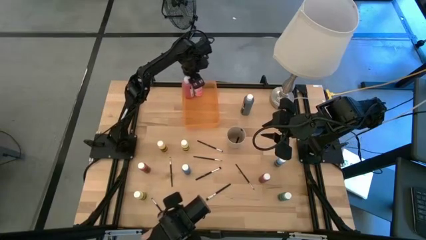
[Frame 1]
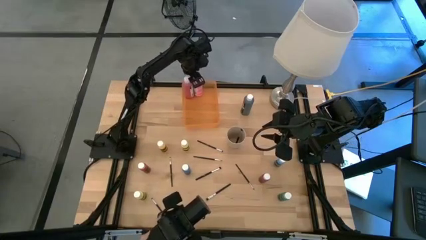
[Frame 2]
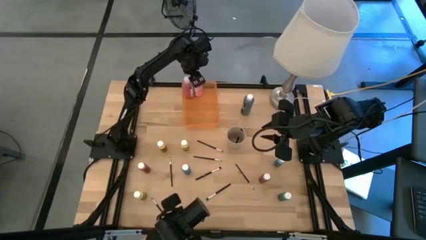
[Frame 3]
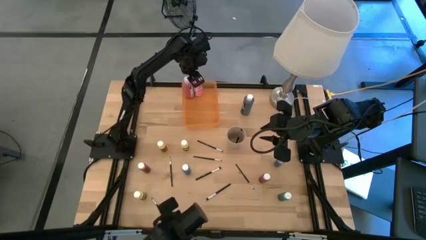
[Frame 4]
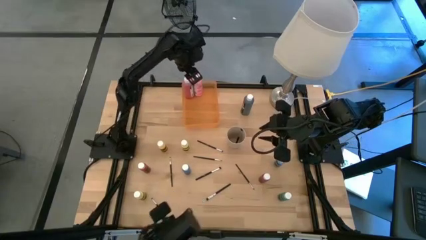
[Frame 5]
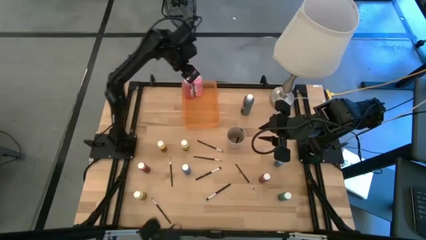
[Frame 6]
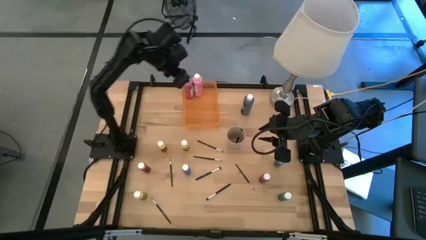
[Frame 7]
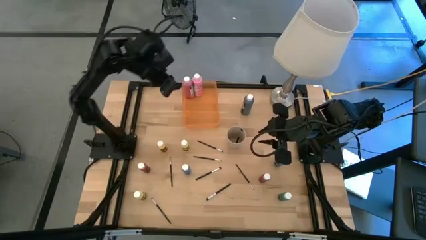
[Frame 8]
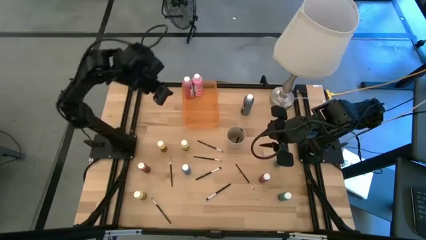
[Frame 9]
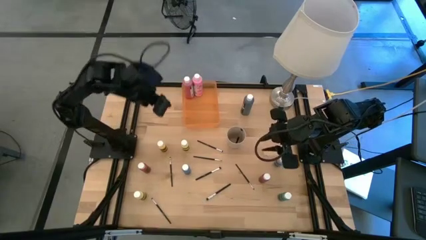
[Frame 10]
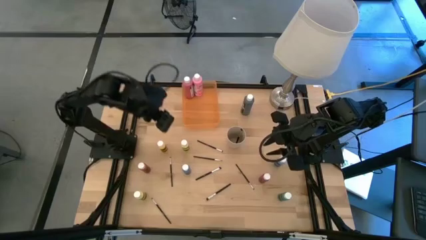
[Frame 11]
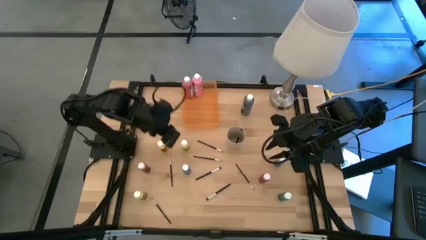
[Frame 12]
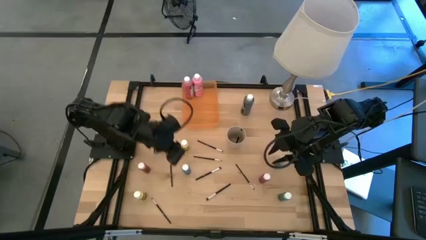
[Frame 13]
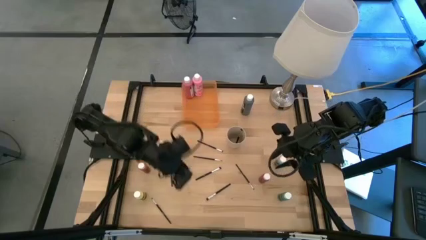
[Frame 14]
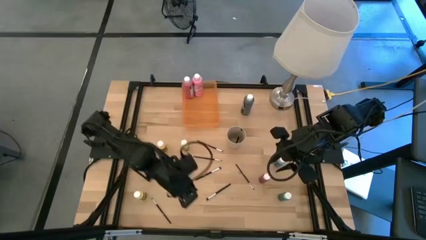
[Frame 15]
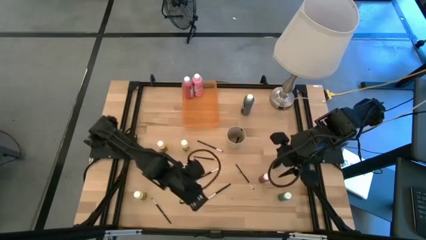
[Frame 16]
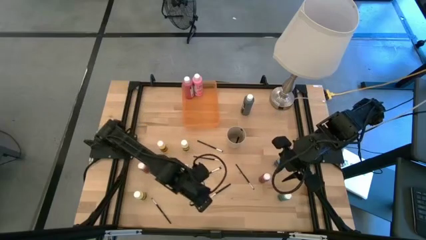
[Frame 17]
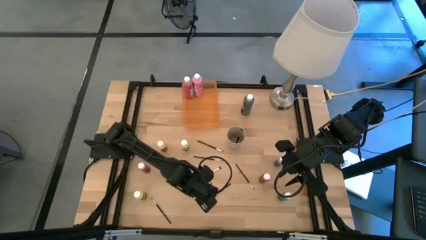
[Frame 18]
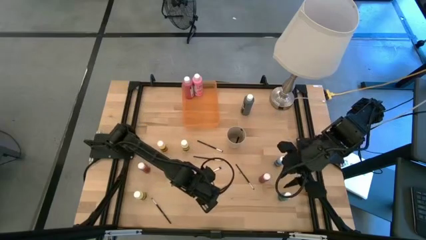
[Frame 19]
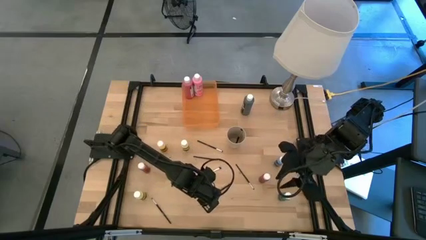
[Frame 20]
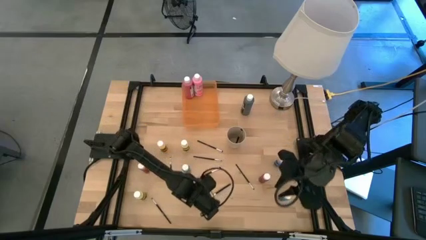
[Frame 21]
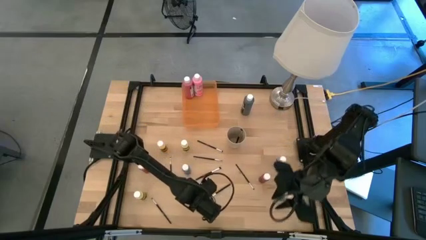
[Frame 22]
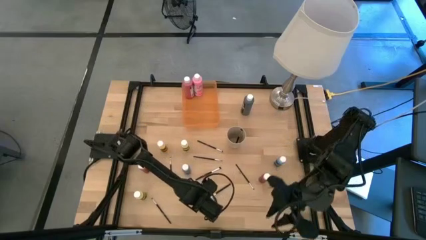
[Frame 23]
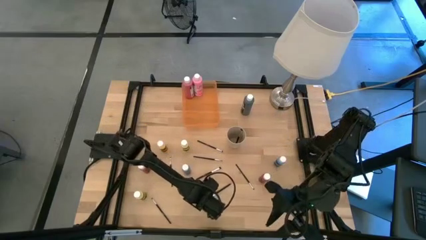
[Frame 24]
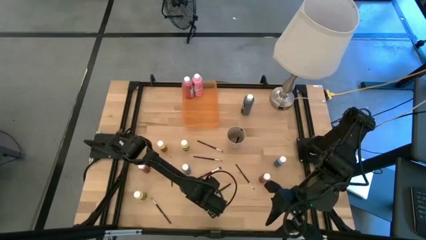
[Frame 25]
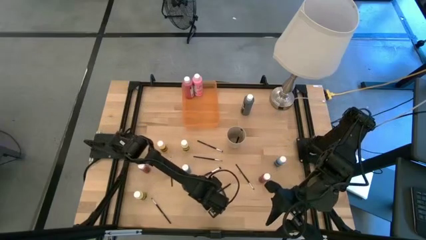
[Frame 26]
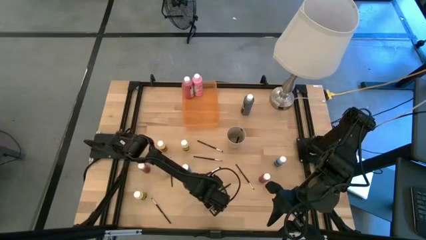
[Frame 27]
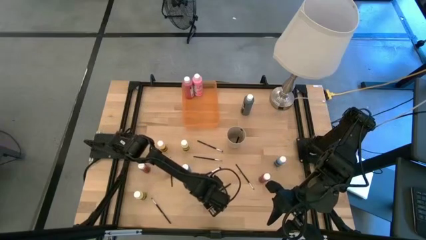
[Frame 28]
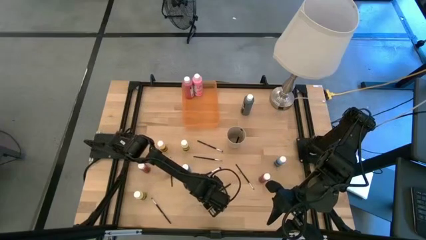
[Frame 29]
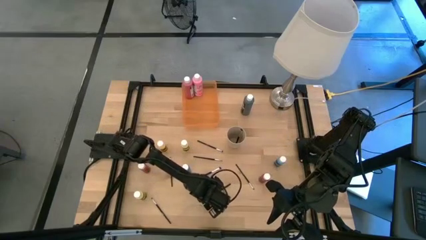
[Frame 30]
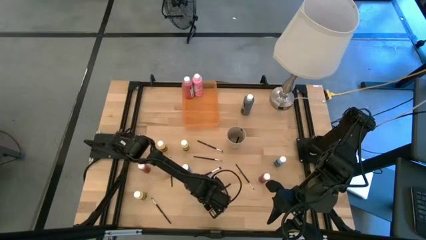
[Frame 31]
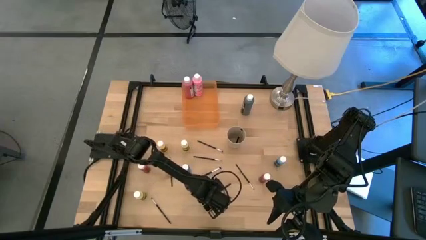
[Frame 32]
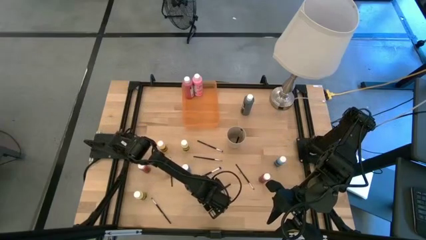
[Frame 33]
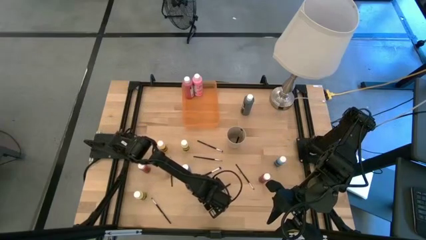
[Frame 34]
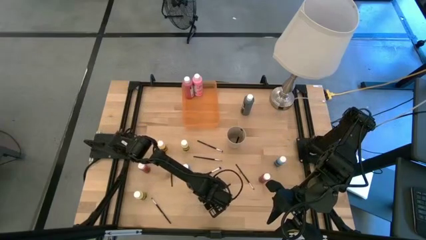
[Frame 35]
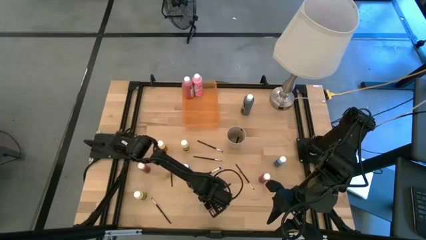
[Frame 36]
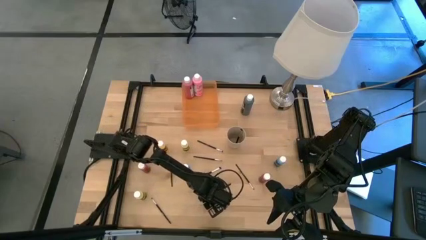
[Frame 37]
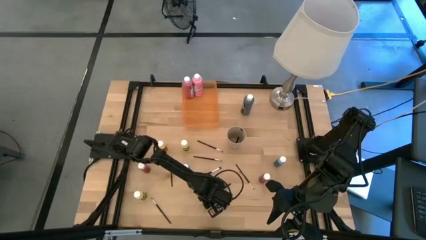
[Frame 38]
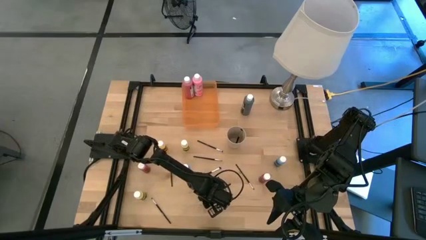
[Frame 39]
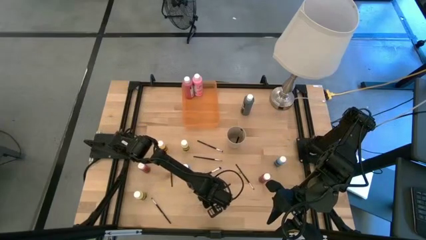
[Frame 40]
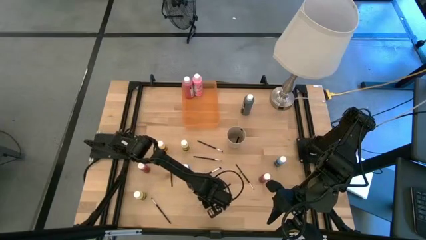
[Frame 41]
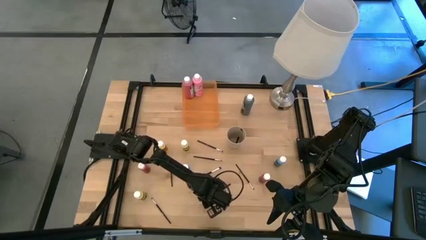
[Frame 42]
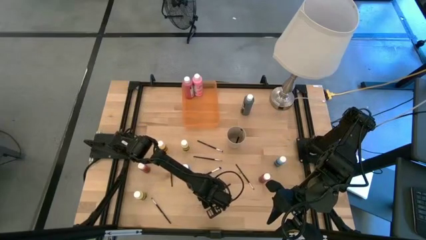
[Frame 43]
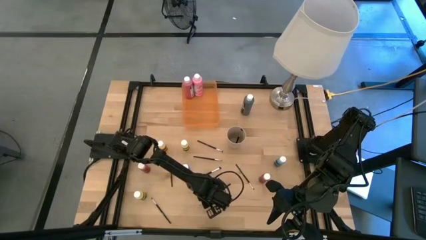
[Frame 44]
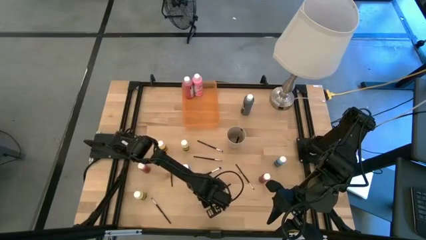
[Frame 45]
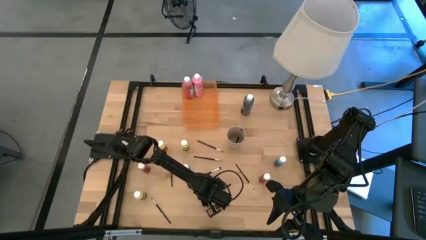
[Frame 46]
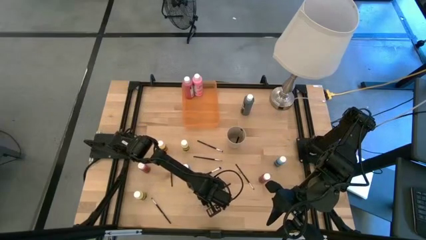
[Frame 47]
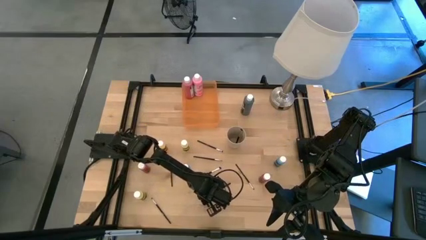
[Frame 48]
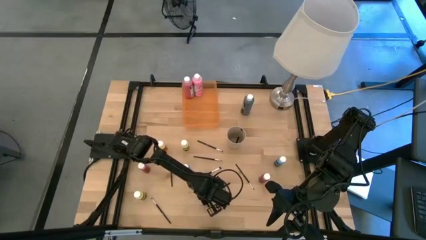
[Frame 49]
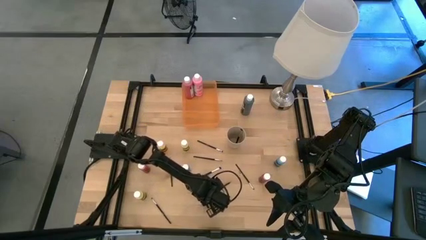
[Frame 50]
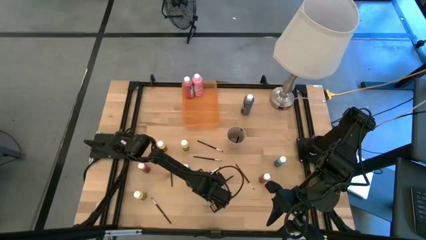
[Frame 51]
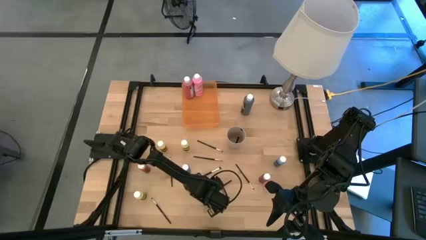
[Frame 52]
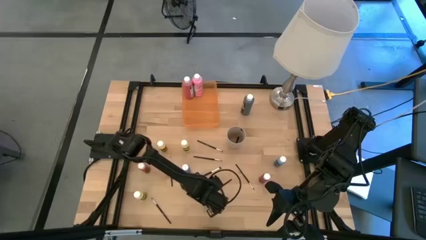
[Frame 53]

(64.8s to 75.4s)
Task: Pick & Place Paint Supplies
Put the black paint brush into the light brown cup

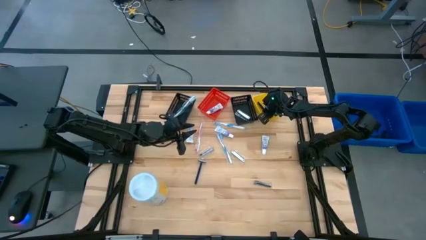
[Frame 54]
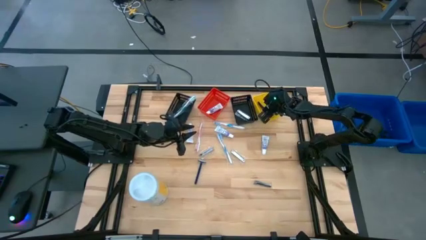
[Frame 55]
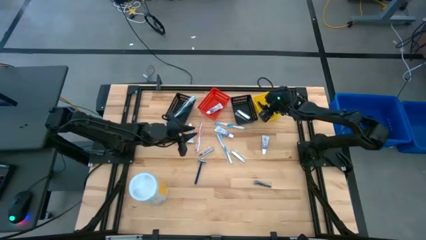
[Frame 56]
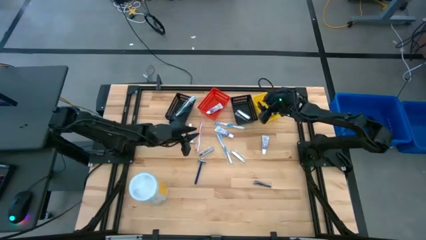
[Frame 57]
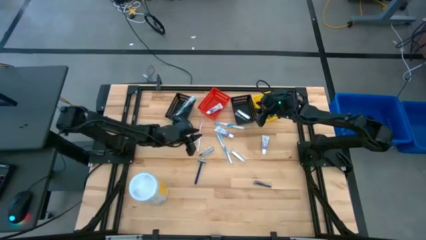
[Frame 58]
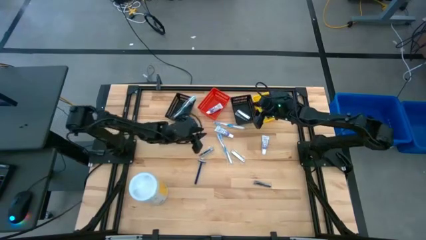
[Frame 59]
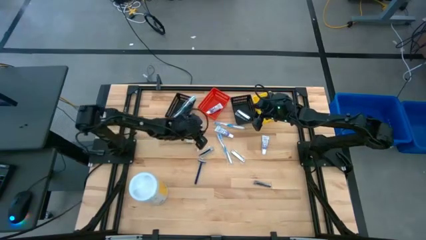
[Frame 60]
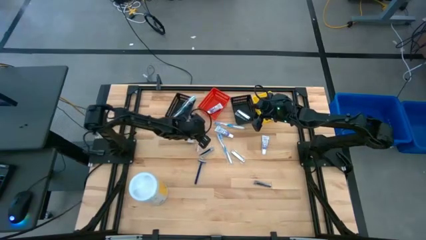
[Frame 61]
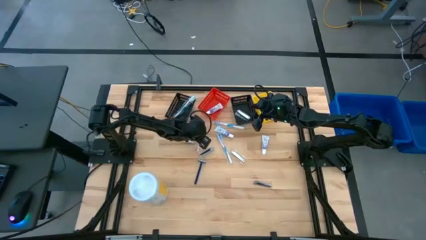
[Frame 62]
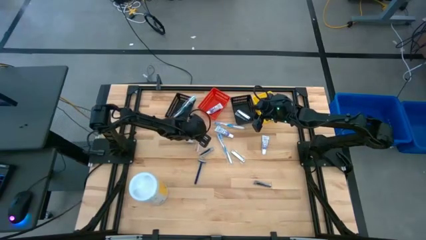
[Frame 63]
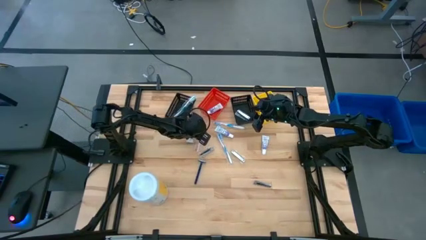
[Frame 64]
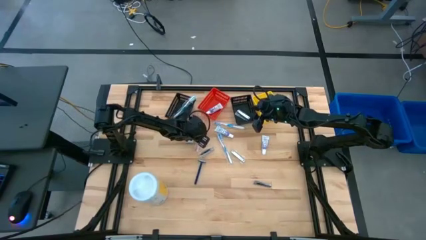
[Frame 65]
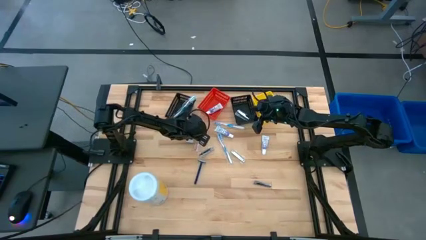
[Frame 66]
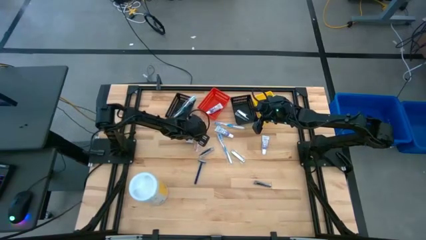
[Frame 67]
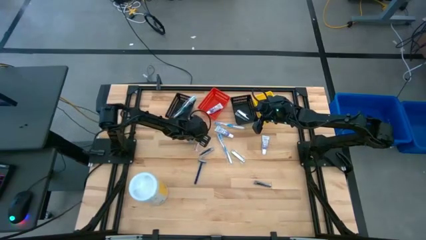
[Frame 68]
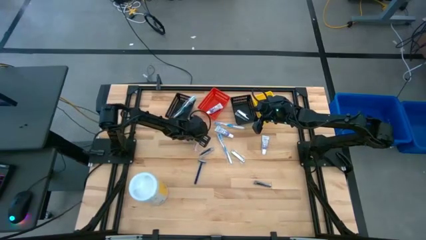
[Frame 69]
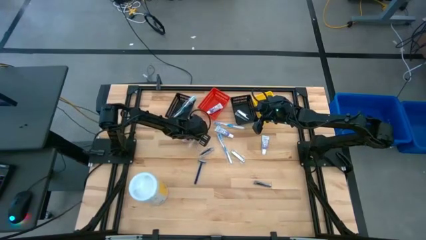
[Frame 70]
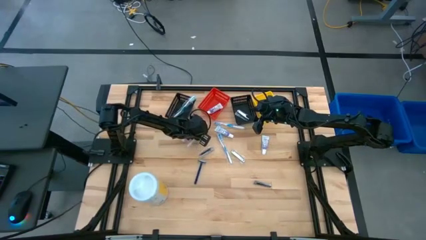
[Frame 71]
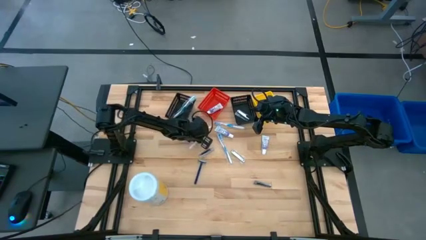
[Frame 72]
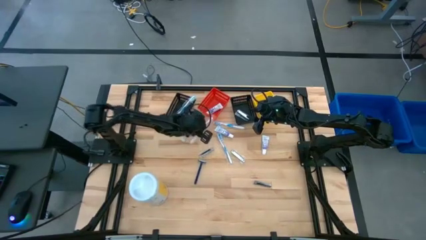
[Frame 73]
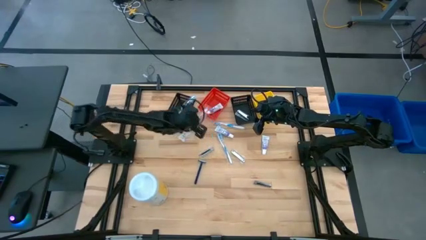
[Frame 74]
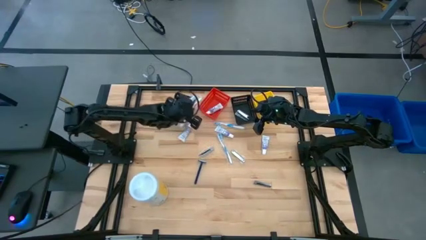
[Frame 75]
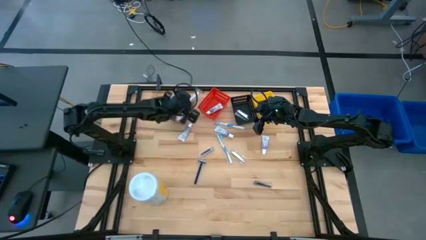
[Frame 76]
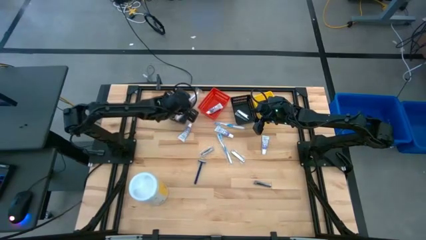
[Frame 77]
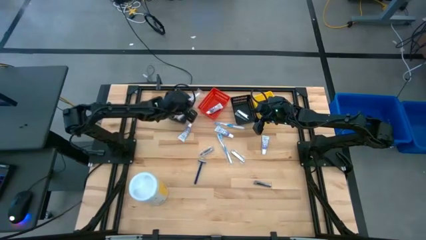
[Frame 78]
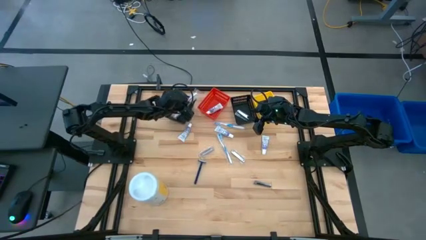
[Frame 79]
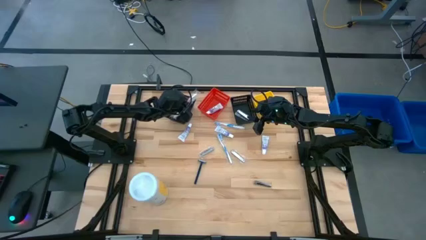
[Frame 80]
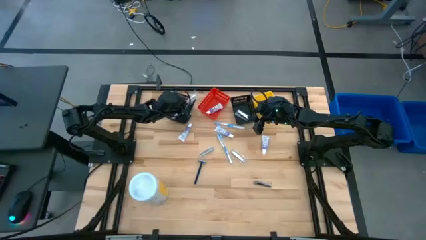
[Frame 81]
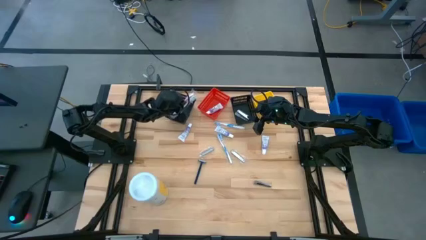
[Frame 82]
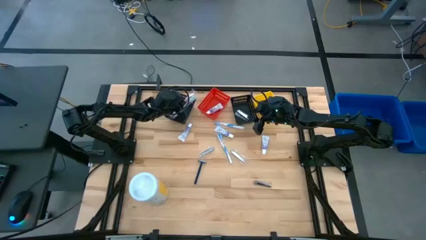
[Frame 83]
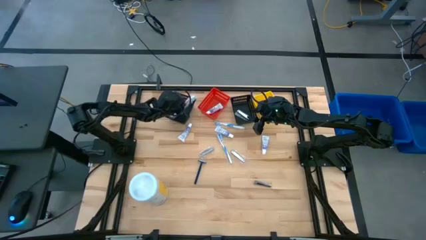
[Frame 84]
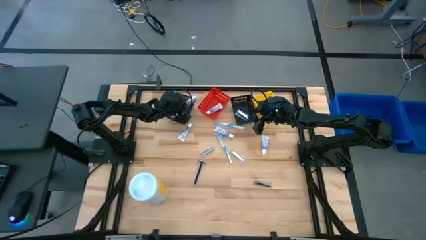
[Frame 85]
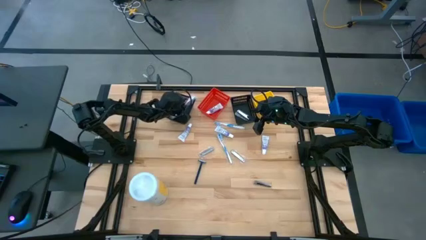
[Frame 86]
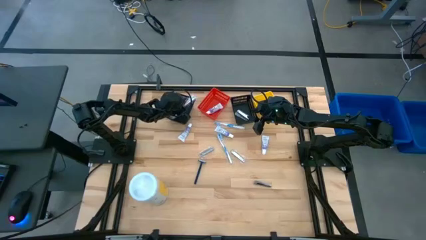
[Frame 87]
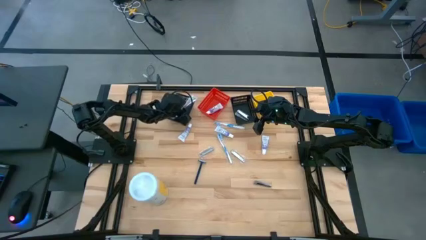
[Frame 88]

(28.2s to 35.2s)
Task: Pick & Place Travel size toiletries
Put the red toothbrush into the black bin
